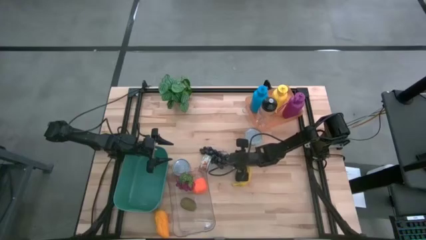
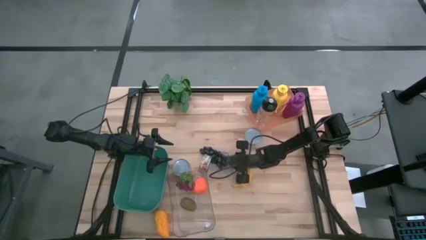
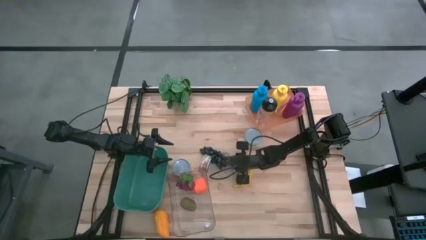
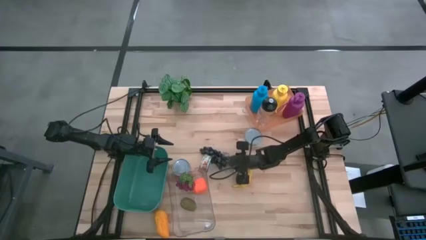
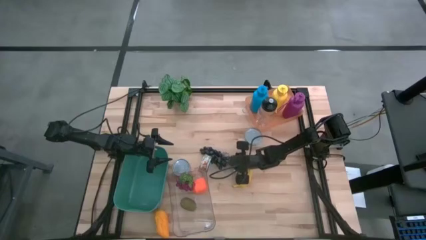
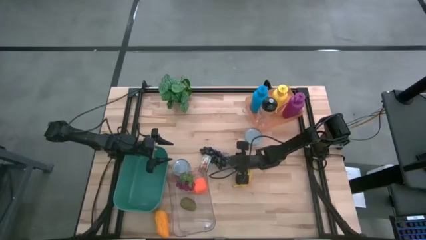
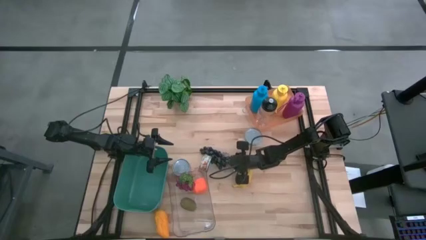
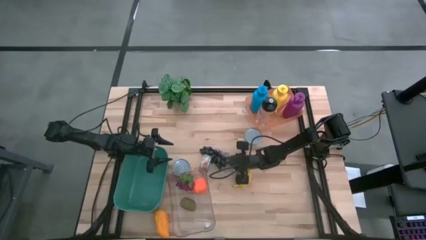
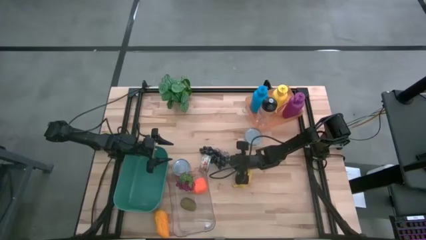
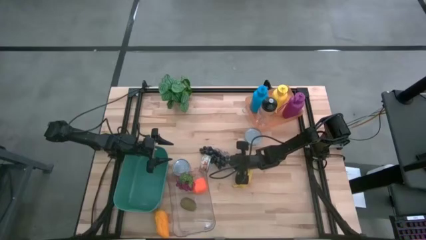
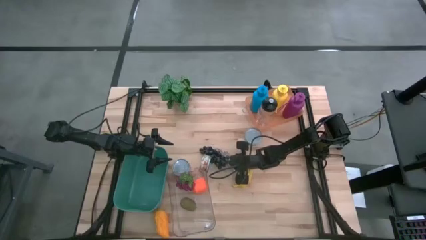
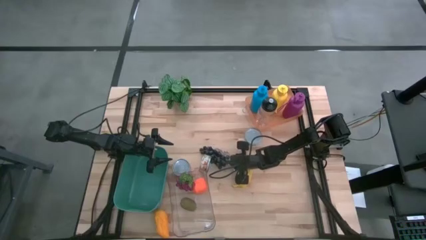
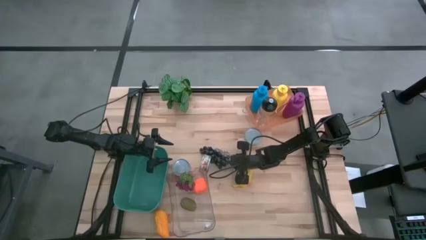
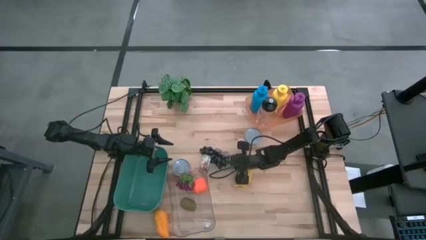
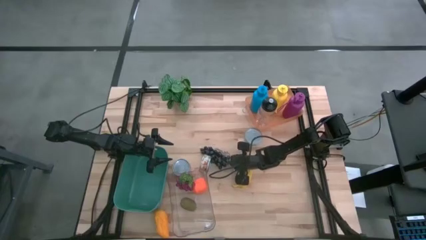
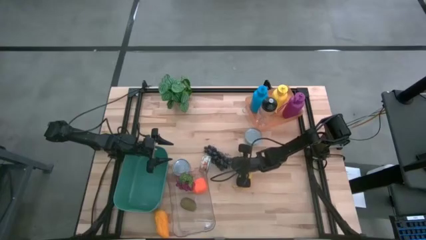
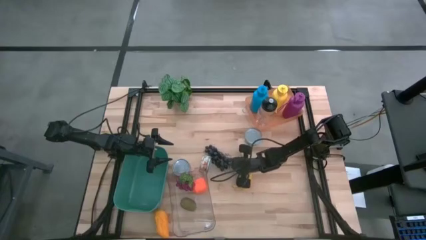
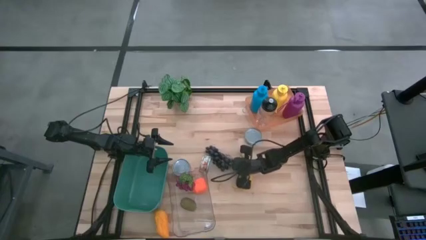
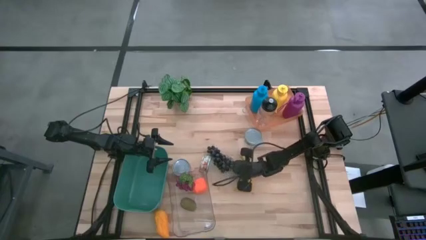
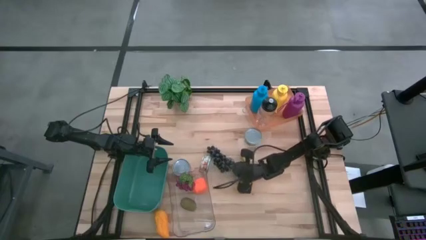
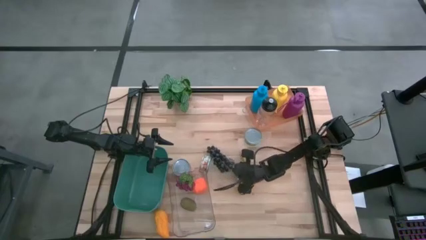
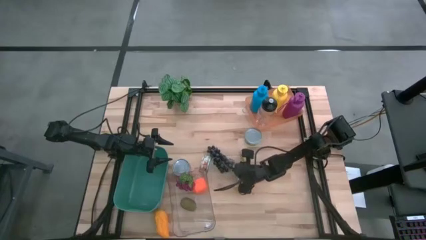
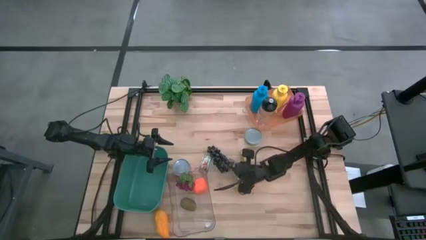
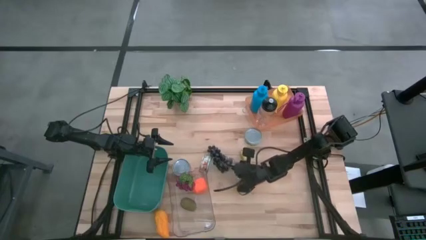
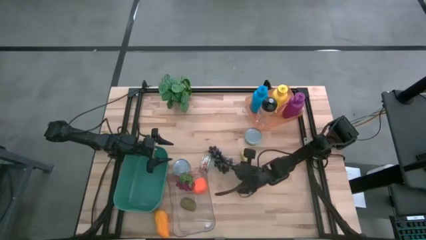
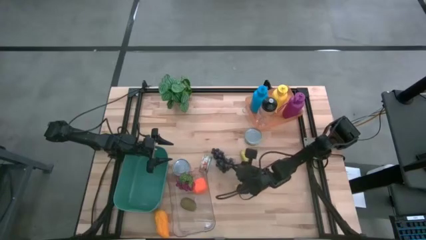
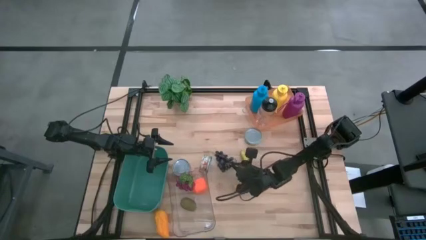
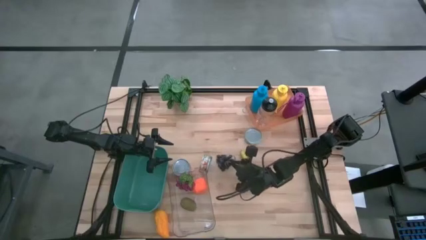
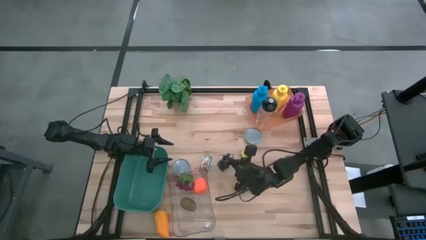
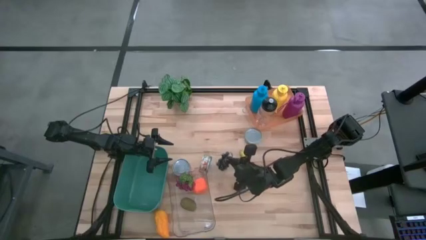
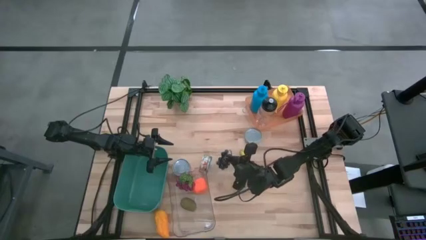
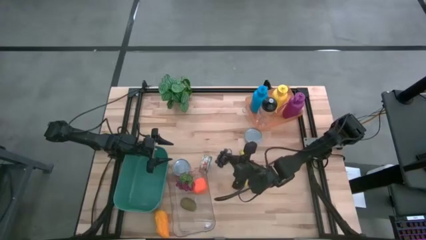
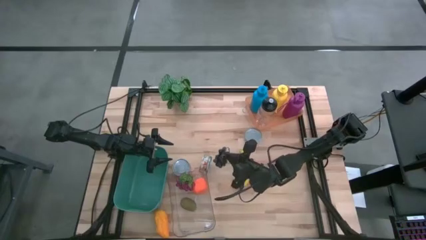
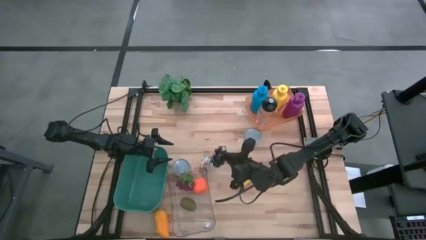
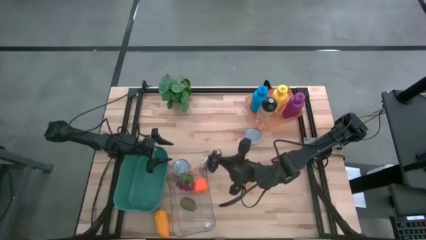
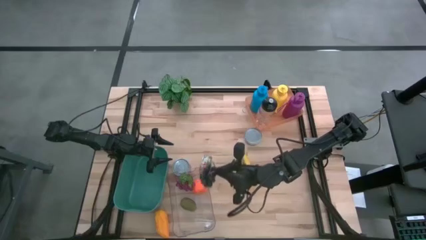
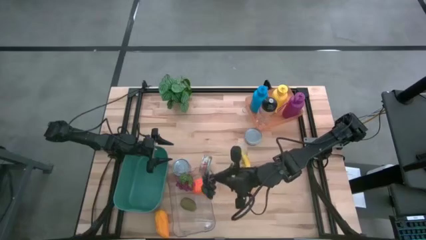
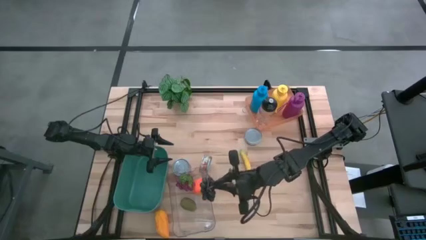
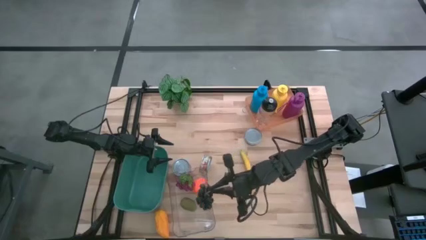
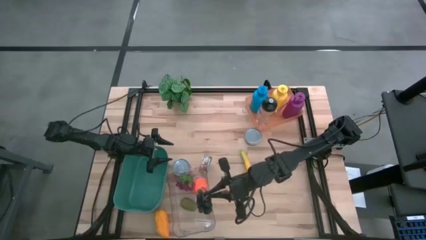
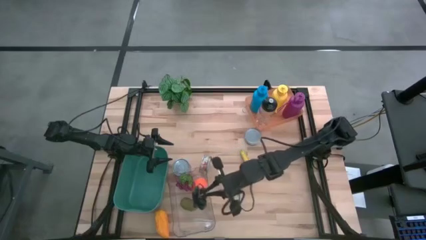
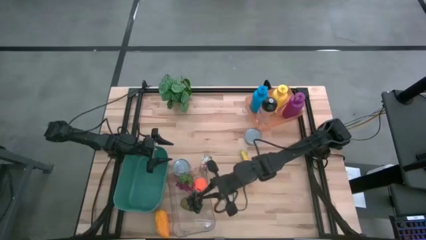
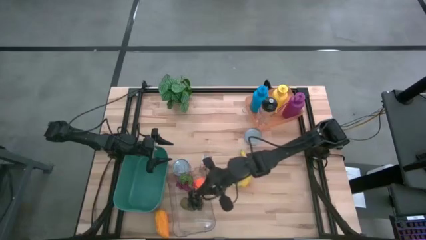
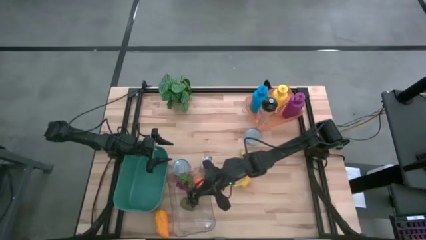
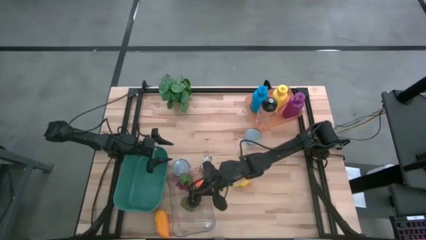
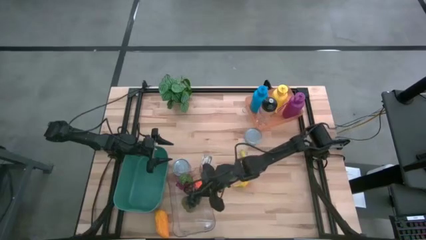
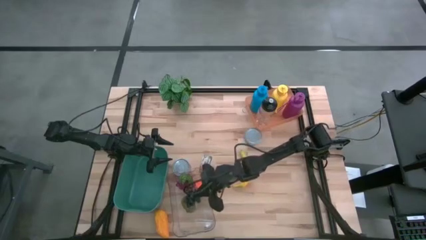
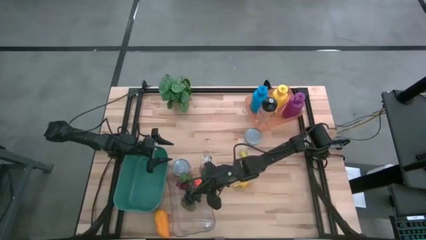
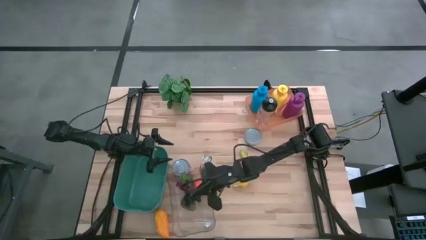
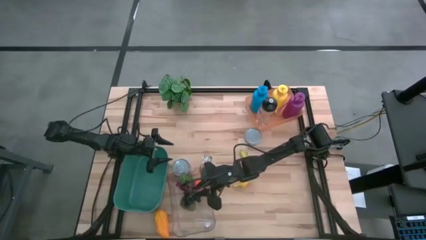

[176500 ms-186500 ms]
Task: Pick & Place Food Item
Put the black grapes into the transparent bin

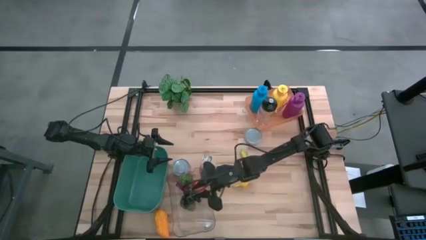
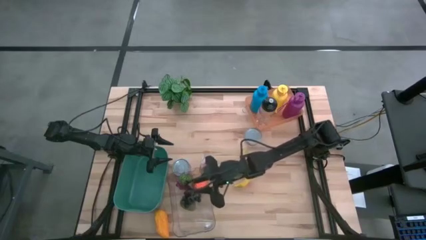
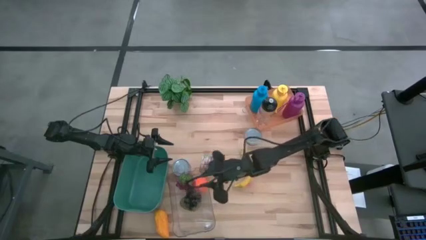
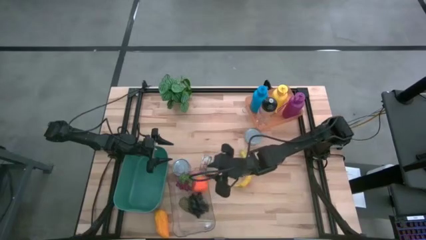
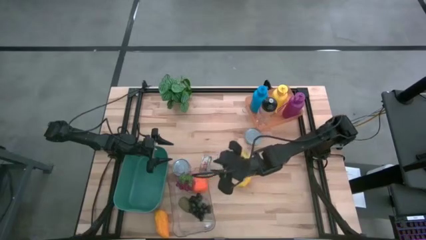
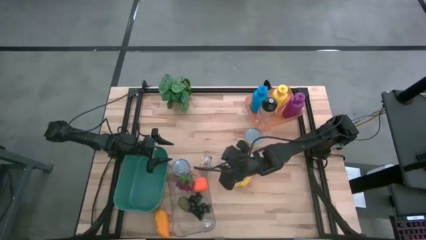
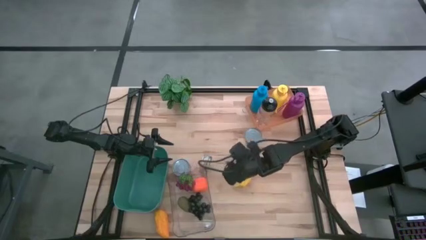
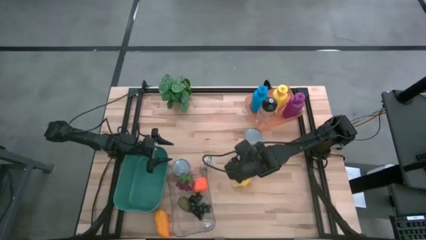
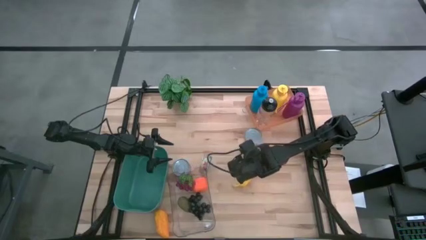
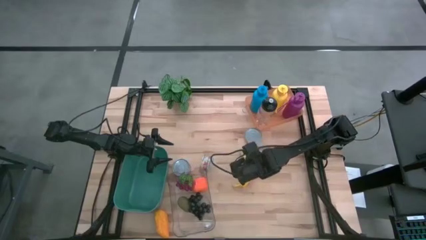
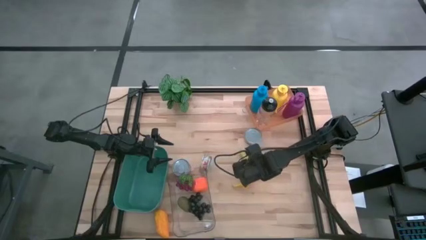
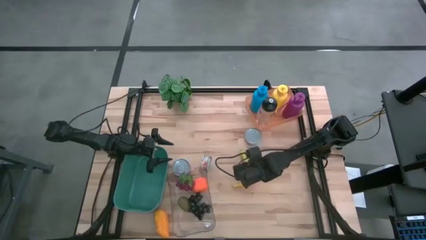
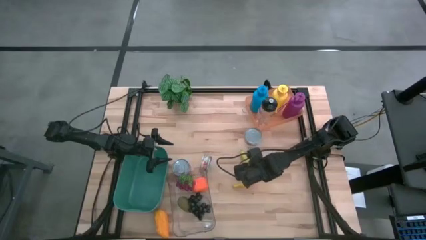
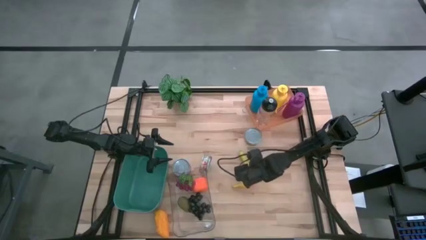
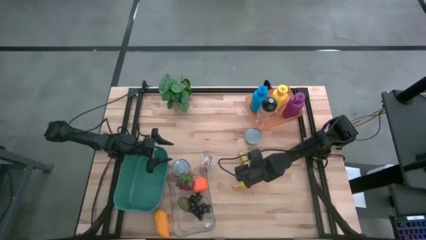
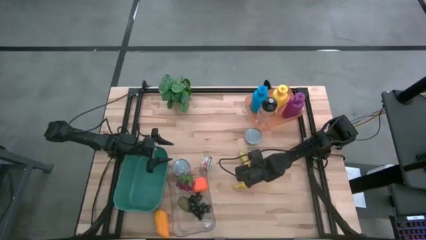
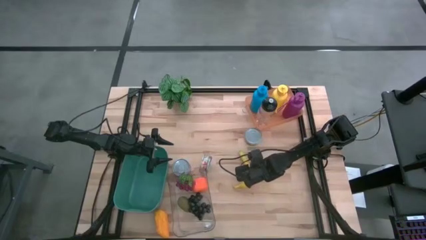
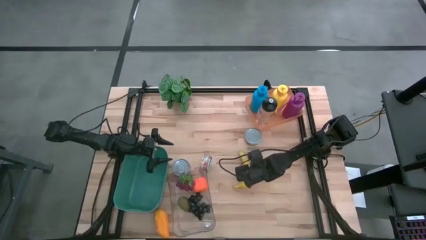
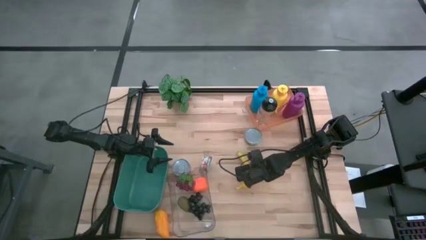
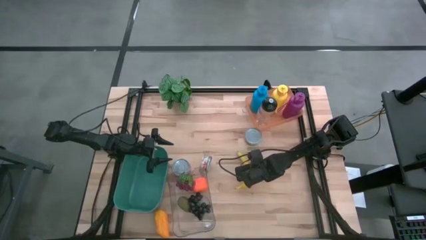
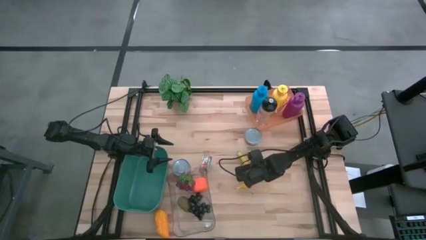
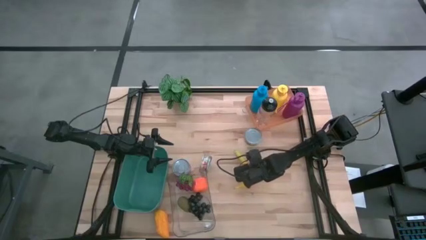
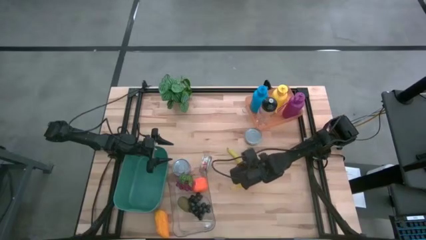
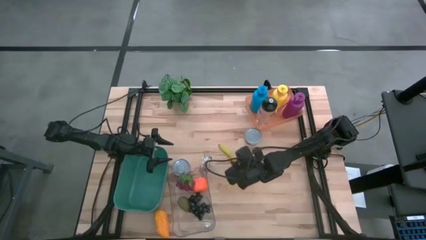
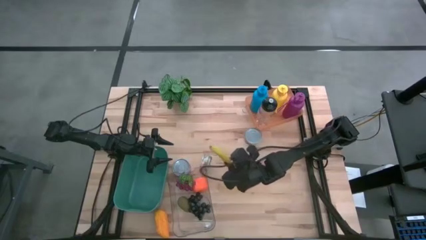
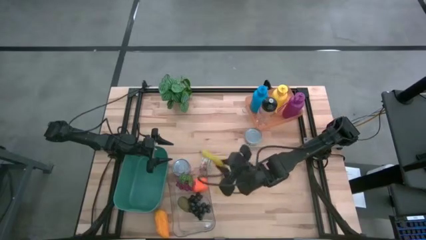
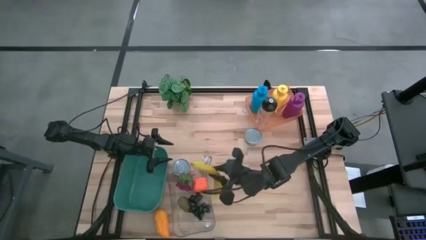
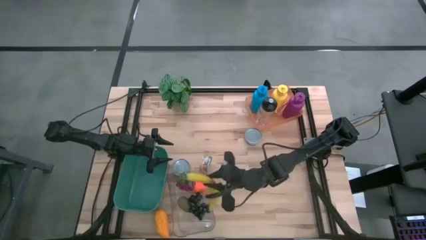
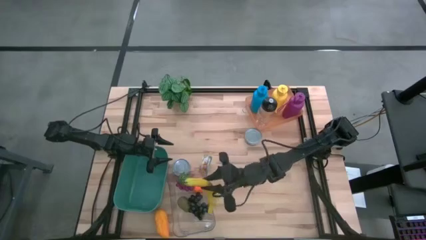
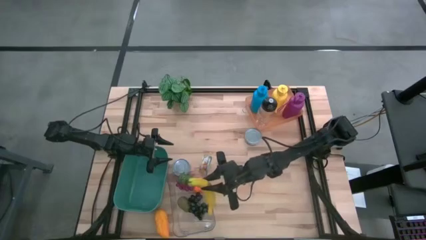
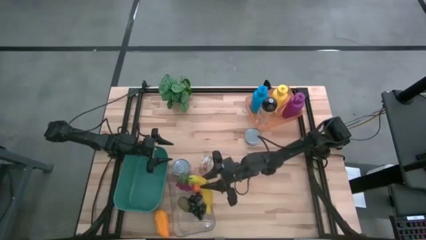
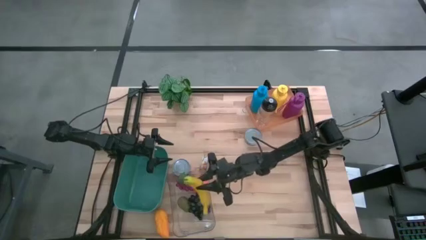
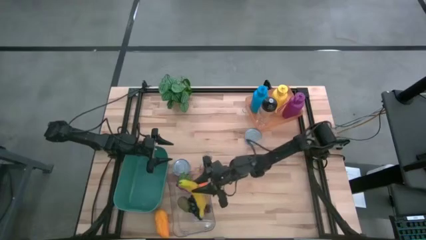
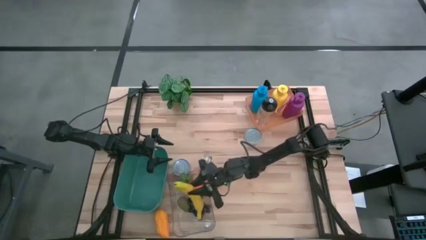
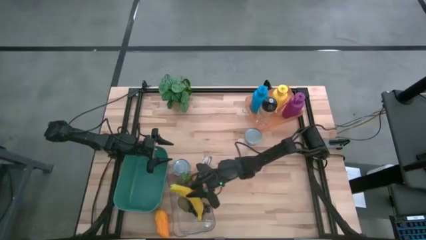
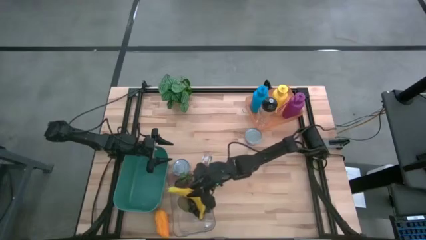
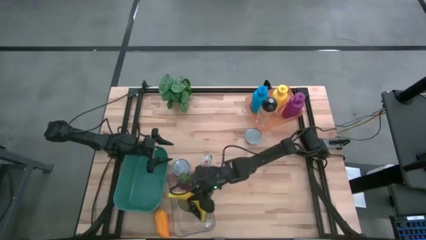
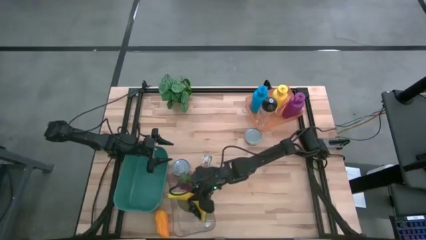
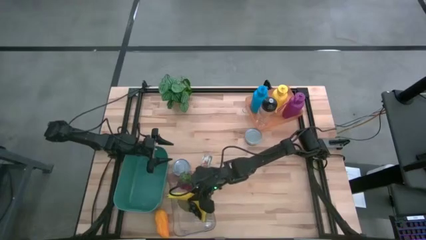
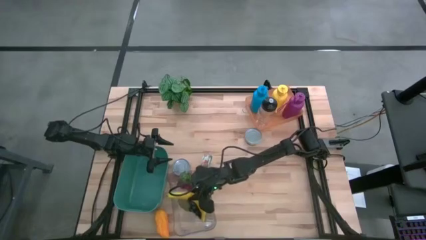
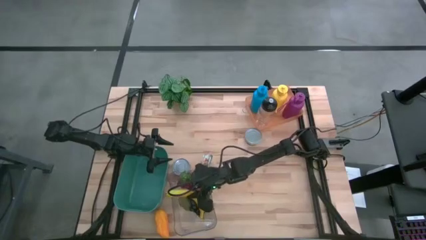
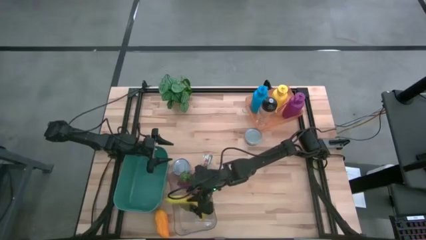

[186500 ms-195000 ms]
Put the banana into the transparent bin
